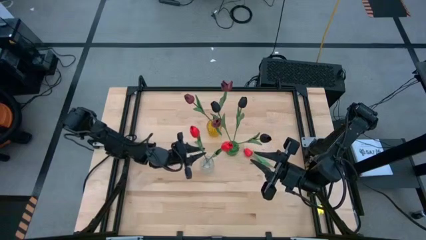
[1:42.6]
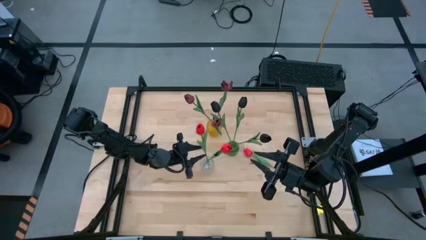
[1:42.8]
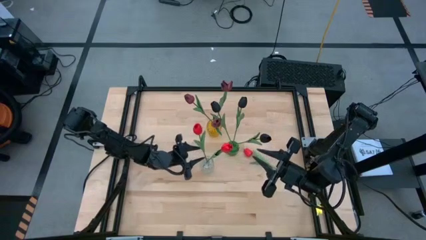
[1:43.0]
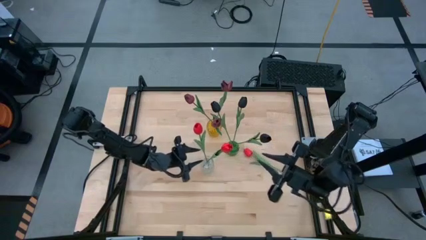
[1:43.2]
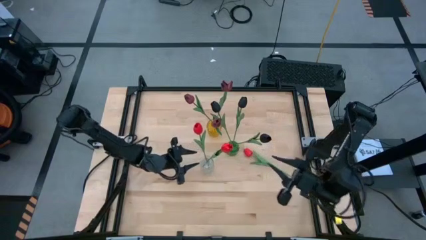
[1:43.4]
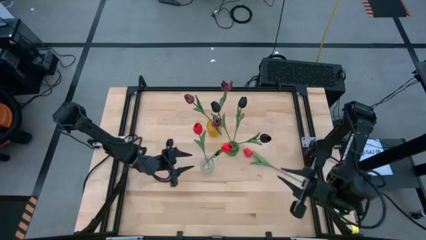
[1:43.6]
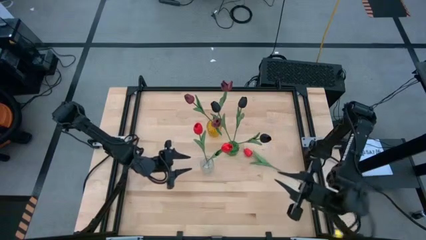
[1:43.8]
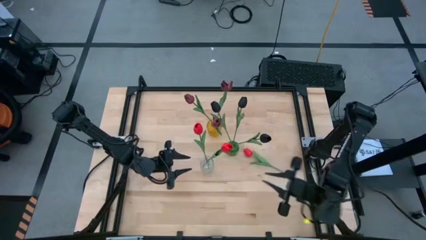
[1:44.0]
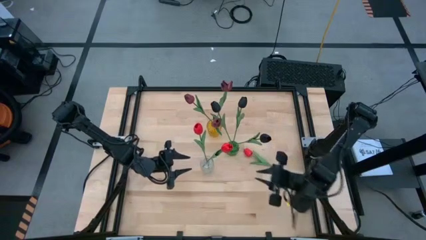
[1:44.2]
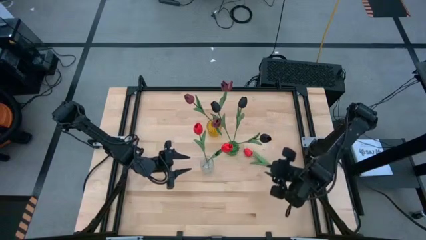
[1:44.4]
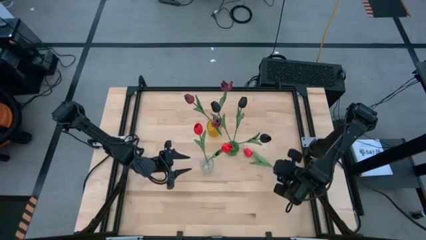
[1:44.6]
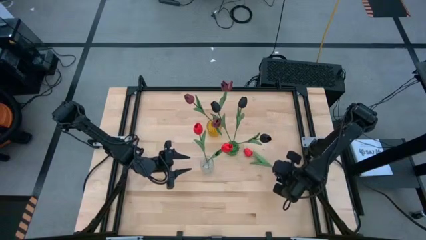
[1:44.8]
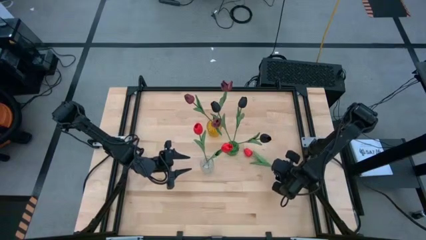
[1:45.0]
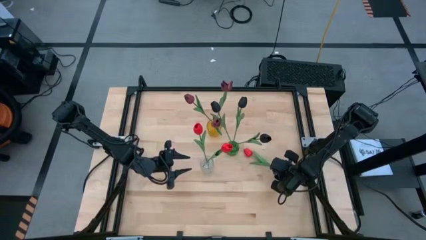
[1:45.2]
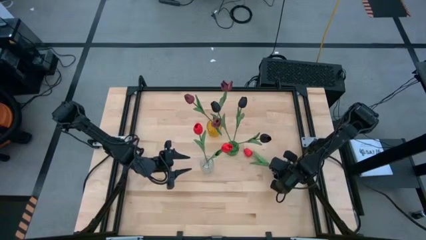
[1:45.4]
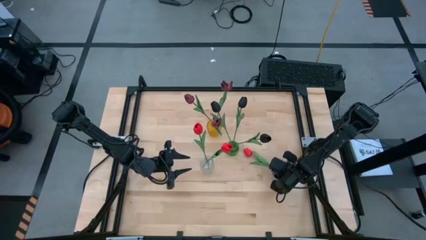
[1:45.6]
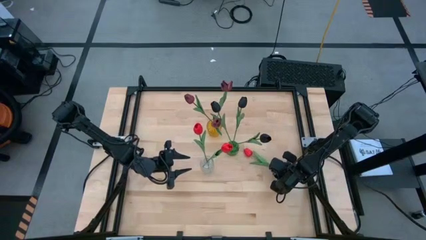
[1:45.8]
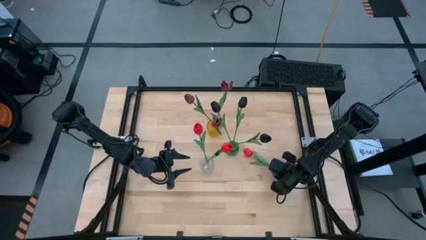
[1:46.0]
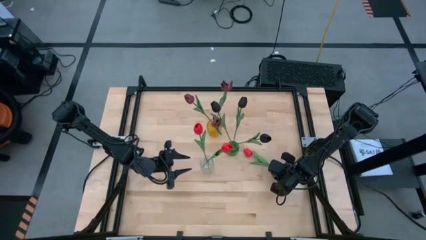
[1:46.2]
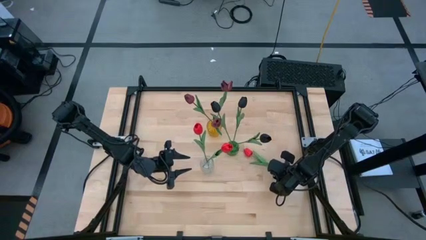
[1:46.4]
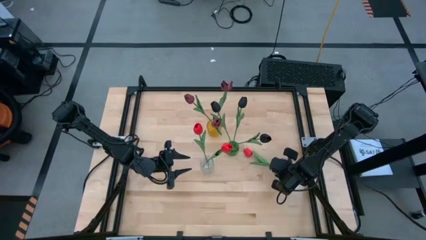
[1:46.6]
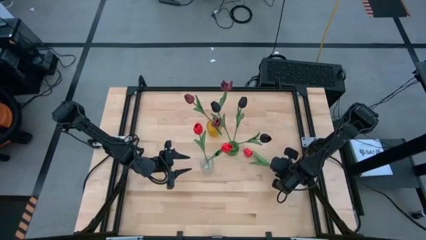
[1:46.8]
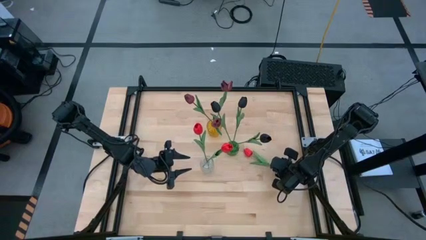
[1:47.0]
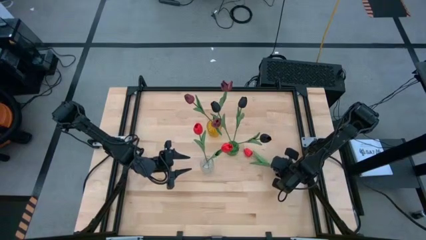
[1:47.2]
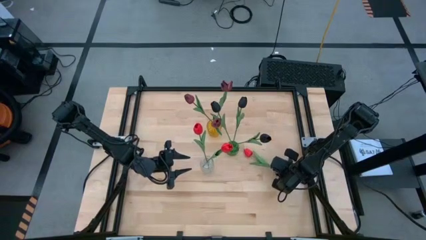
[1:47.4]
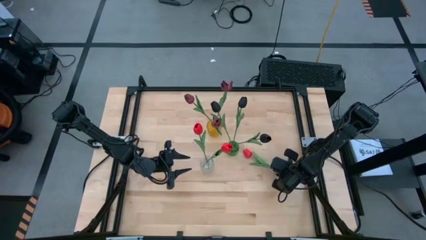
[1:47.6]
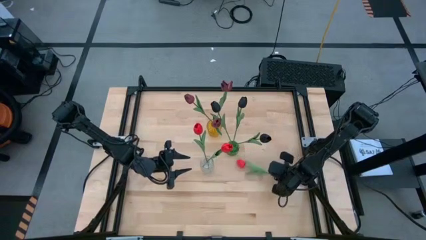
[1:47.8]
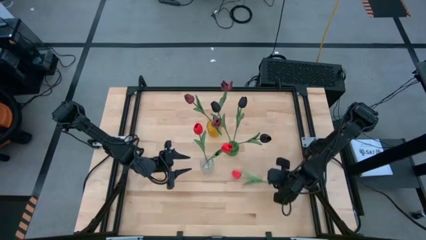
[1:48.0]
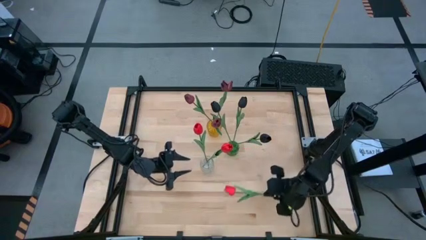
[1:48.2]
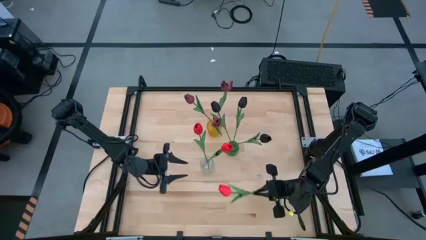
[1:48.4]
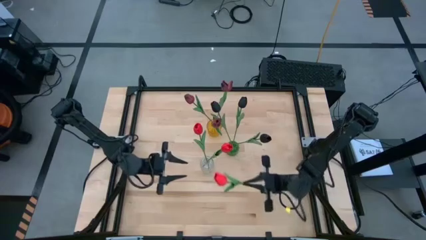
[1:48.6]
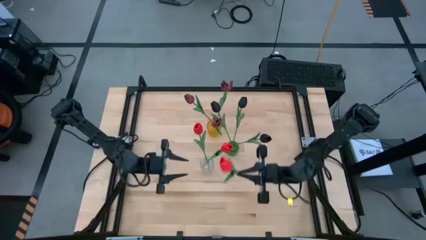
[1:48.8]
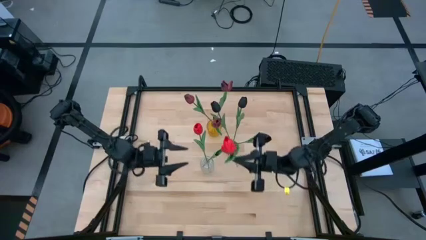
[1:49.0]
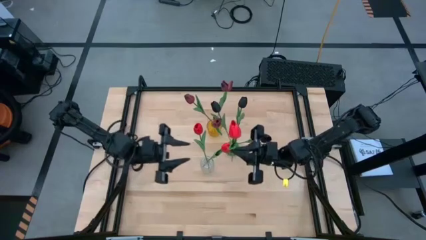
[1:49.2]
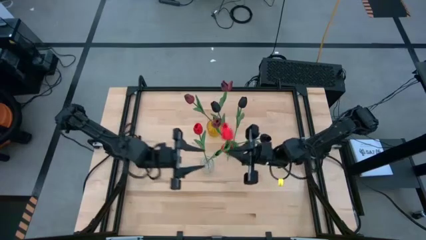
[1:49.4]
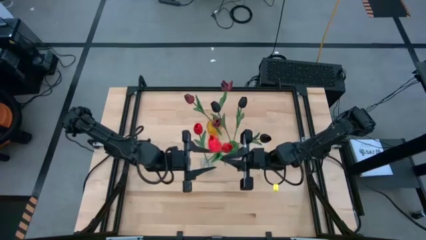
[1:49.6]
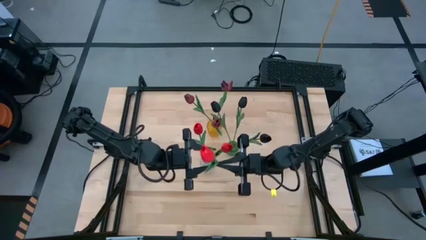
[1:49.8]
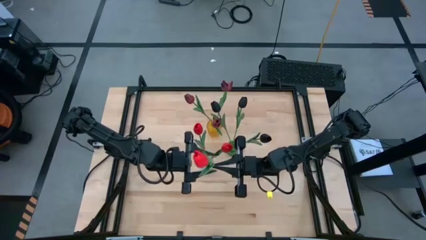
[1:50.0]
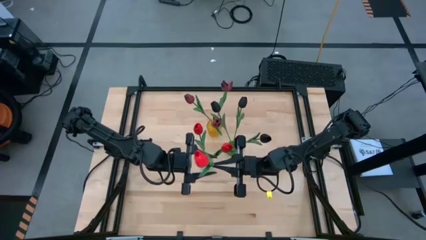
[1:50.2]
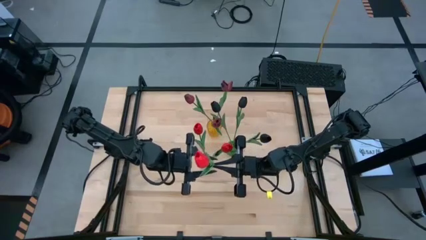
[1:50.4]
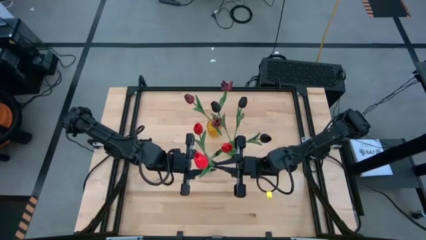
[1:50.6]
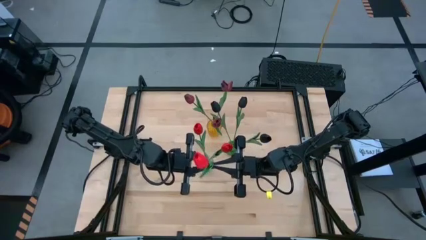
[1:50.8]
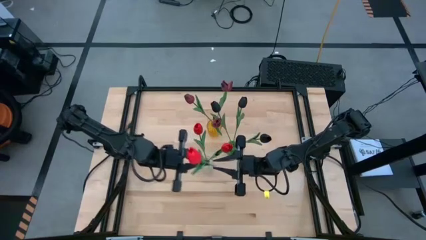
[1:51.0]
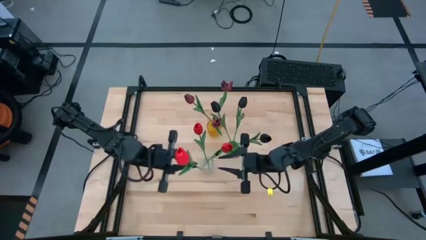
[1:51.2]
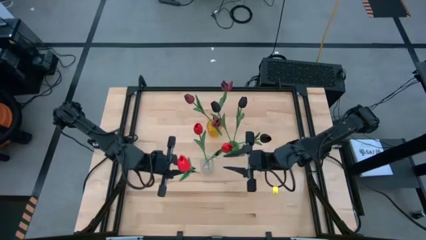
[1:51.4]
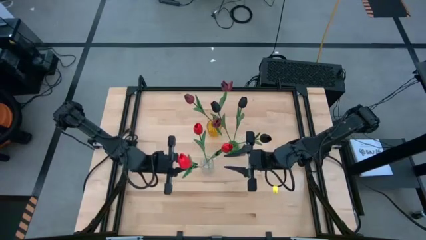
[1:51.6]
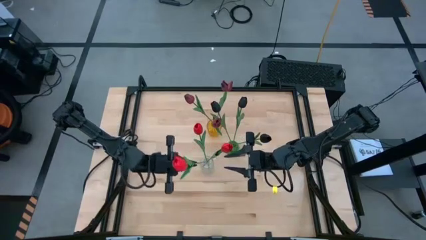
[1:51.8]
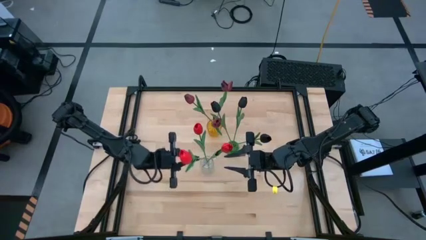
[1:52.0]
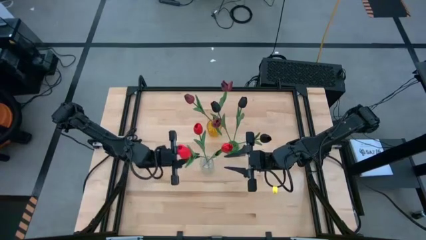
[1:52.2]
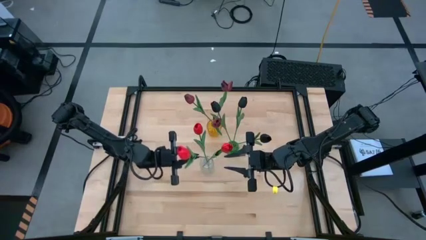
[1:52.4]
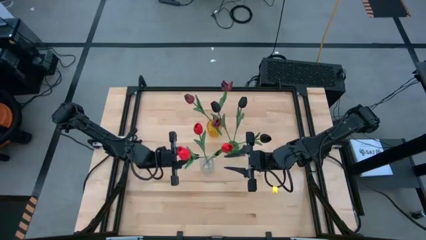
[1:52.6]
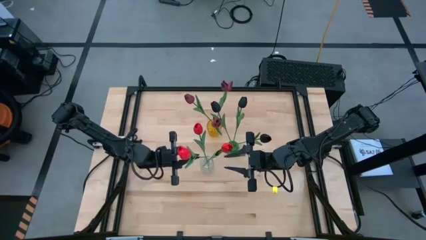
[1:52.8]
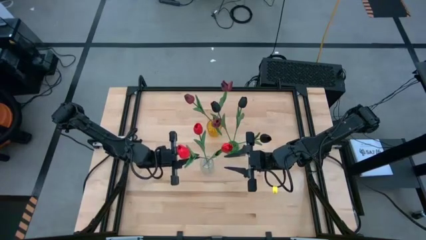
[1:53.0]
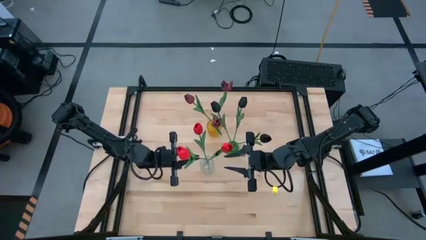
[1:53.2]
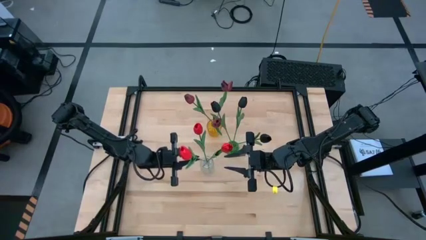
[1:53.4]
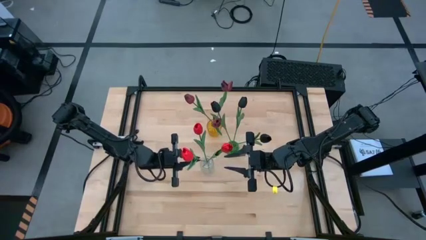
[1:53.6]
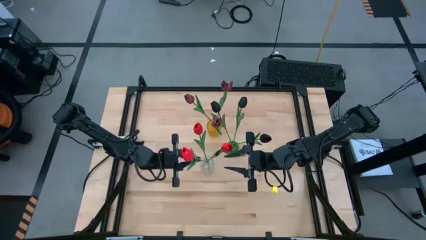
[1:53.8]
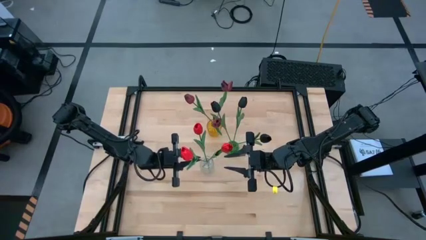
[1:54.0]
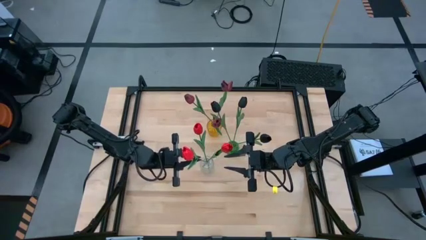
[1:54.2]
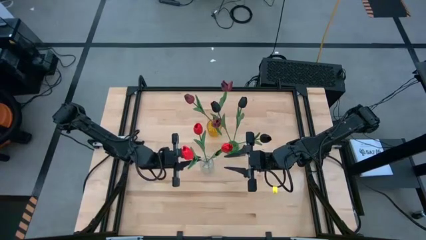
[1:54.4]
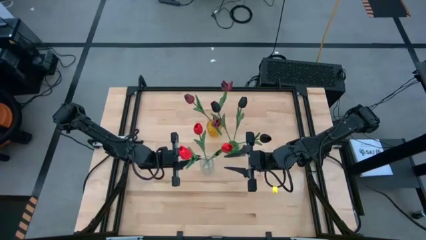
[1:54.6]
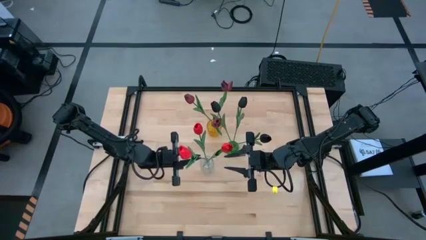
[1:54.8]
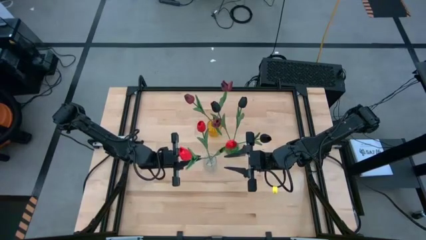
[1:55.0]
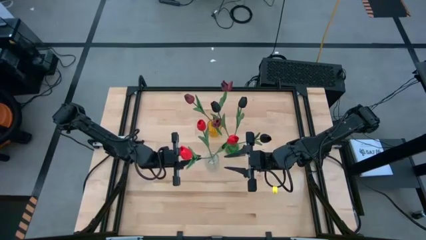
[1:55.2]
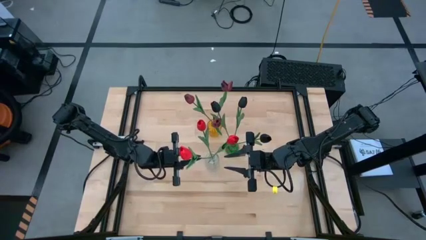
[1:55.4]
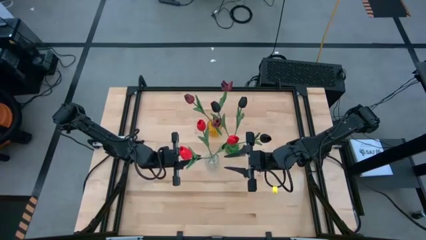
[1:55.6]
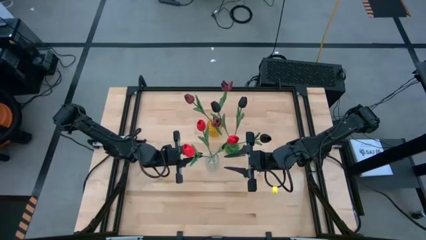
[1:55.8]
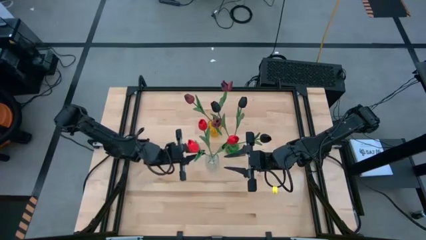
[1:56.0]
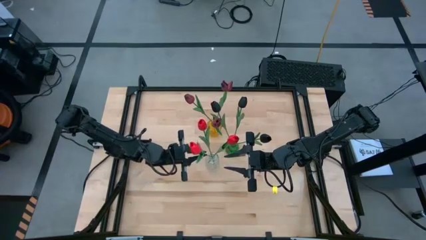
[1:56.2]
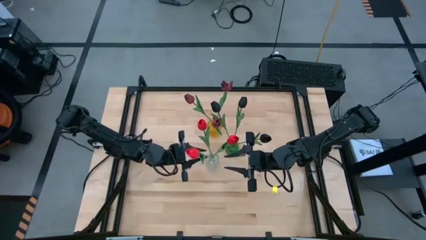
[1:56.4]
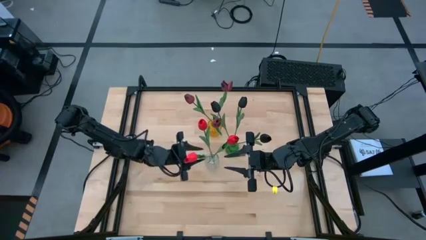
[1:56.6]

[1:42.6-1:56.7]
Task: Sort flowers into vase by color
Put the orange flower in the transparent flower vase
